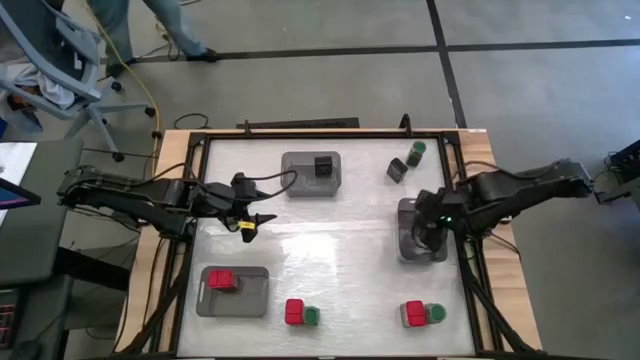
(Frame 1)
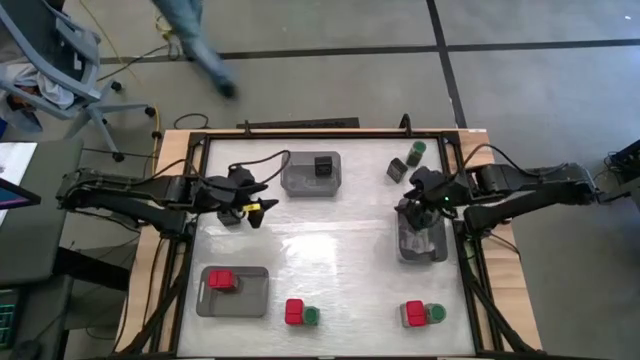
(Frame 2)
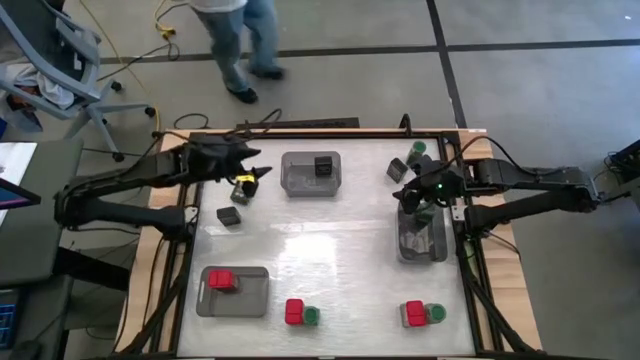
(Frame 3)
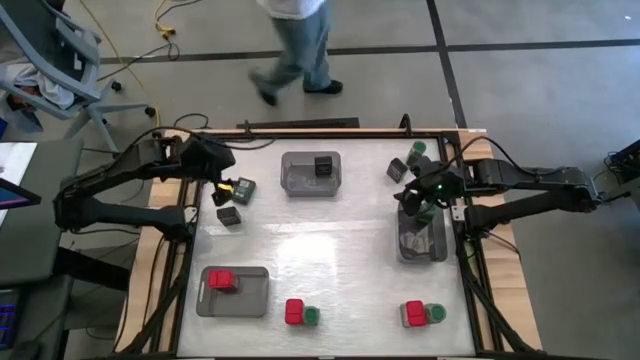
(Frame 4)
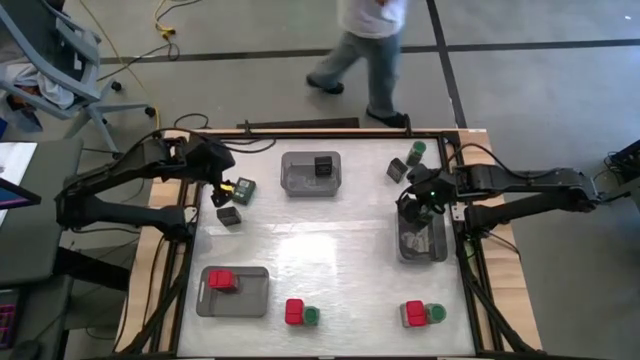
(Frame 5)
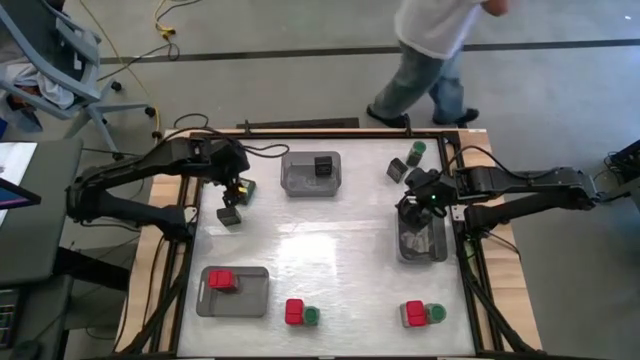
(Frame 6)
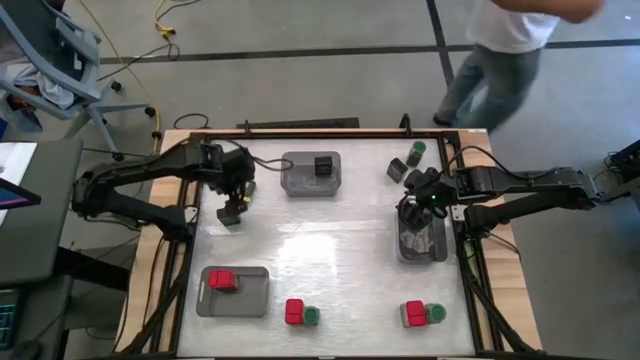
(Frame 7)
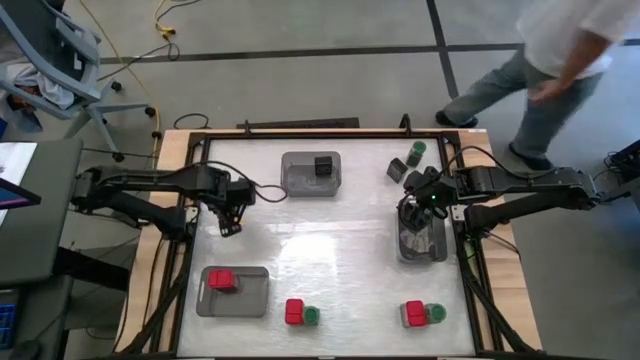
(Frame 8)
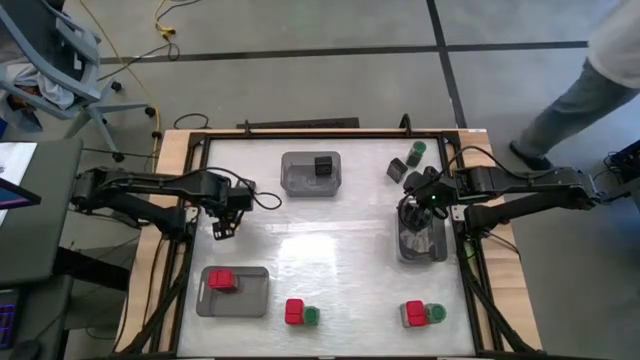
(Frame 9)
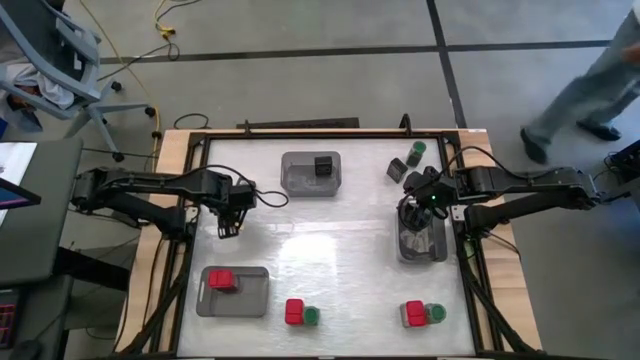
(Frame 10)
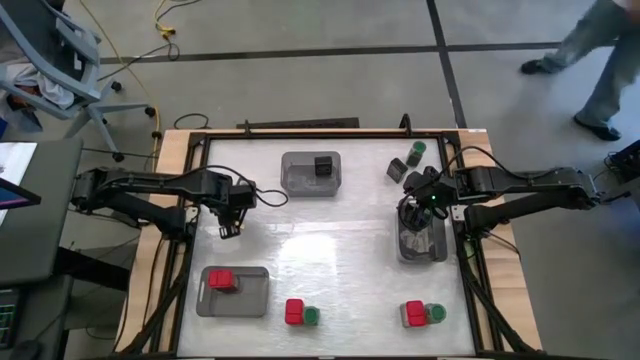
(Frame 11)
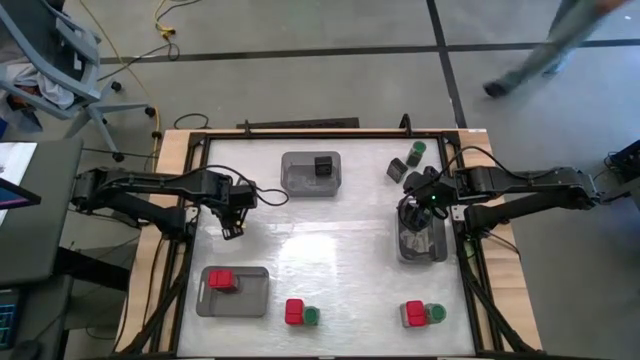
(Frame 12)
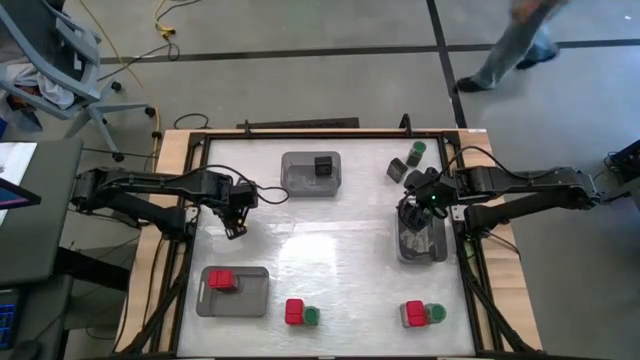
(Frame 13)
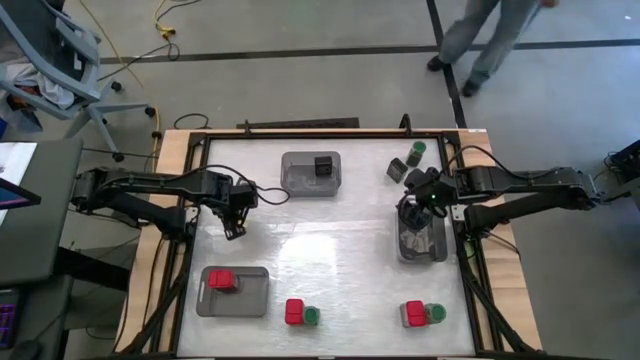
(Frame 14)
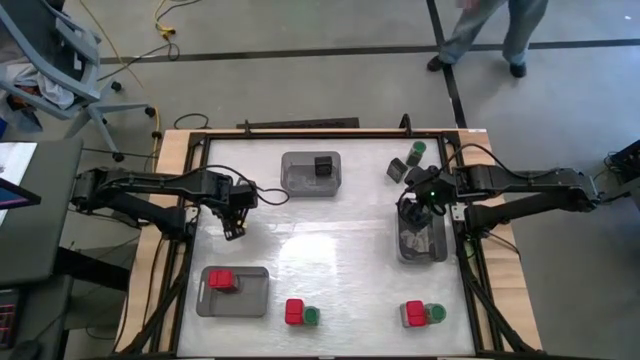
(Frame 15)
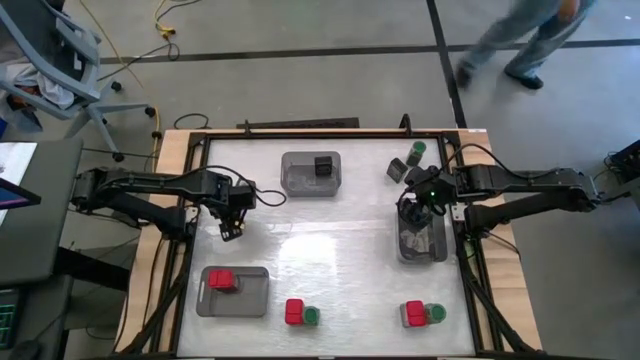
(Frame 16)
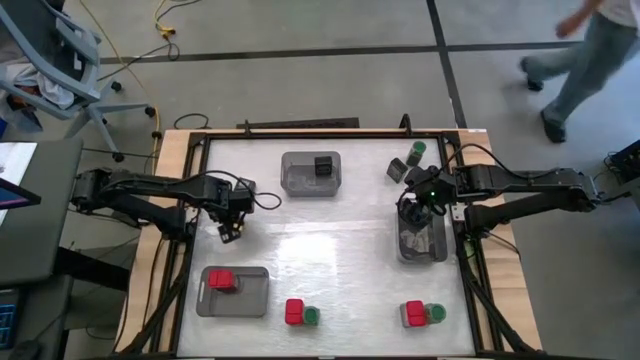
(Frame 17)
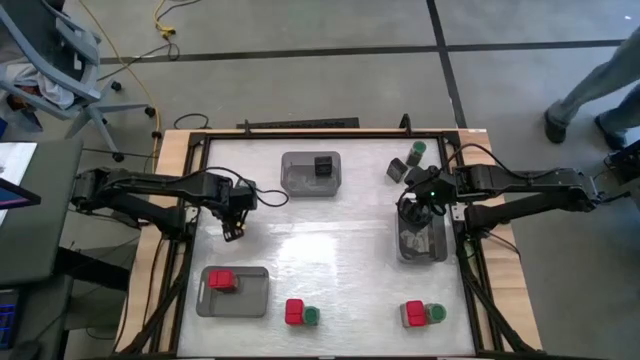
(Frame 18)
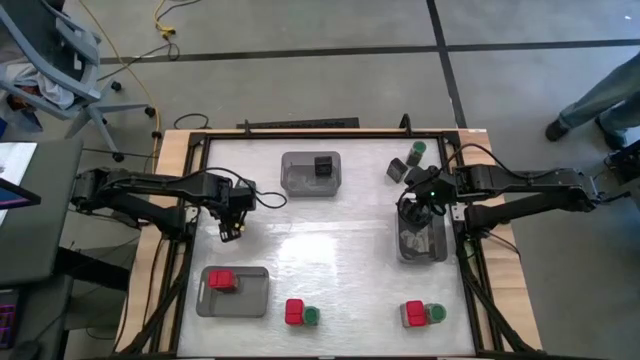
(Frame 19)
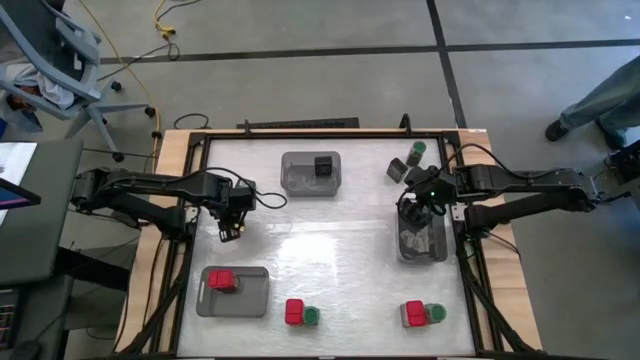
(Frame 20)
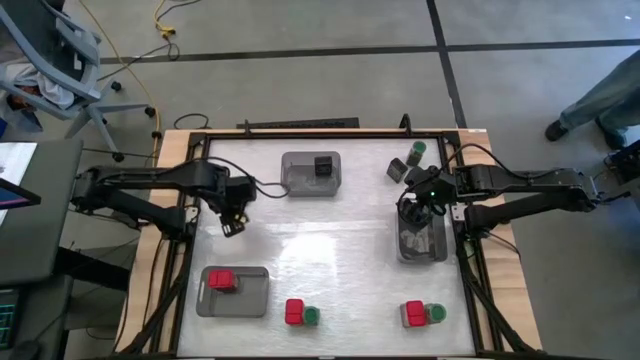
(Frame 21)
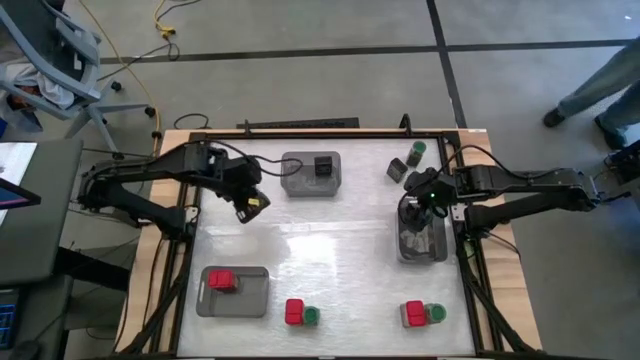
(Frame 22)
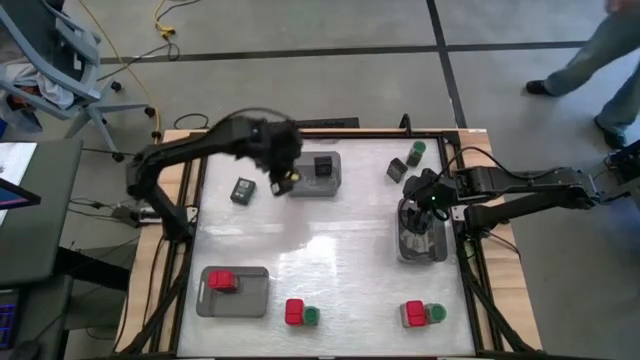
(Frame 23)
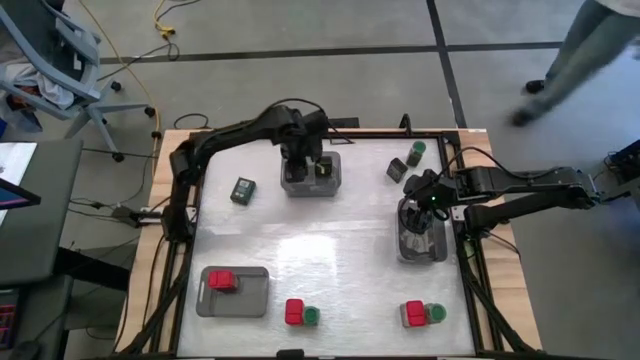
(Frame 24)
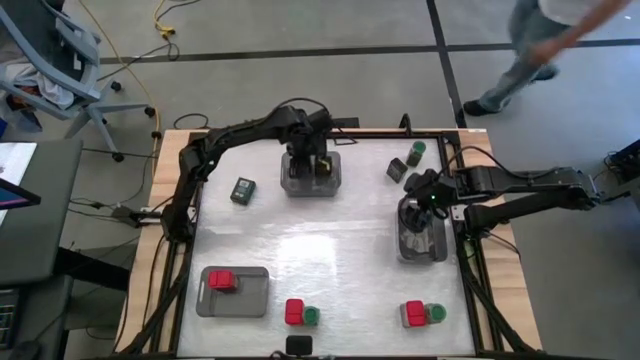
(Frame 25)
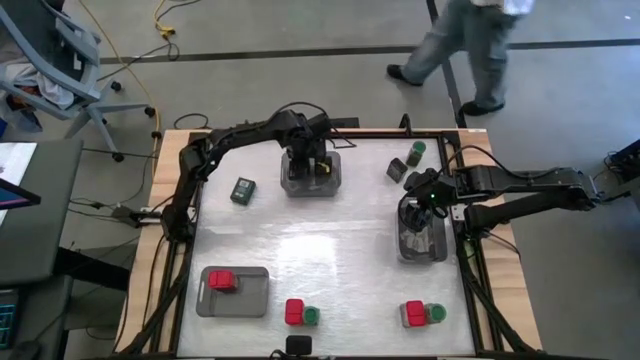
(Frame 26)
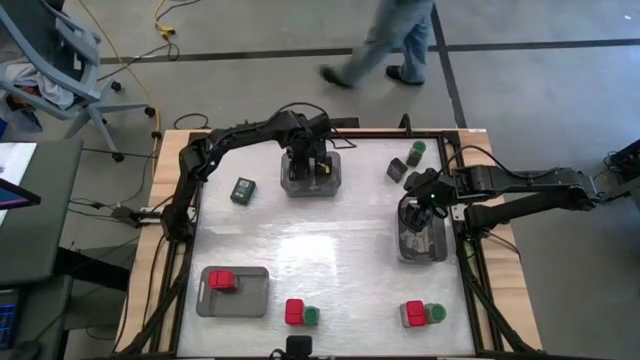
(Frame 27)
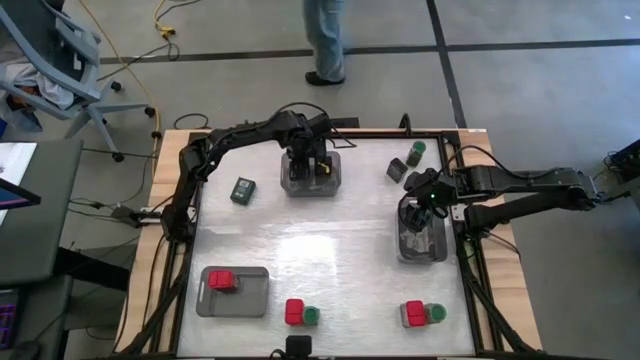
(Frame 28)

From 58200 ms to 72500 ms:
Task: Sort spices by type
Put the bottom left black seasoning can into the top black transparent bin

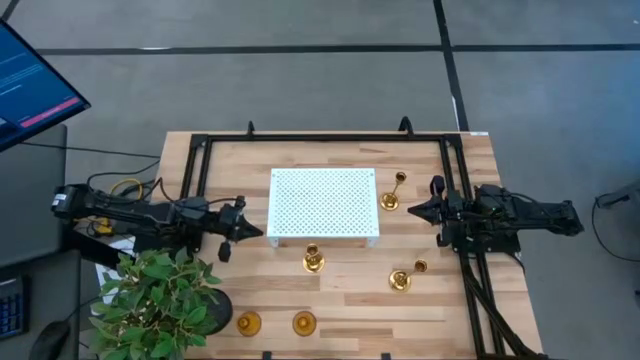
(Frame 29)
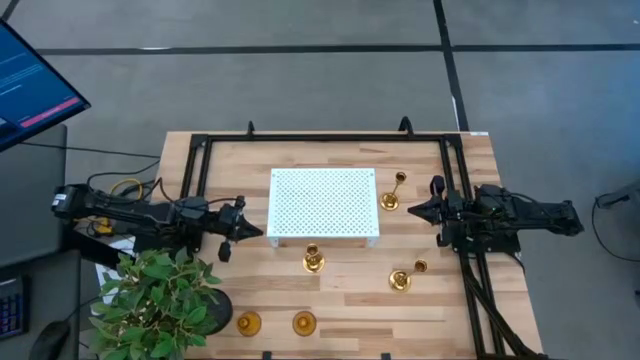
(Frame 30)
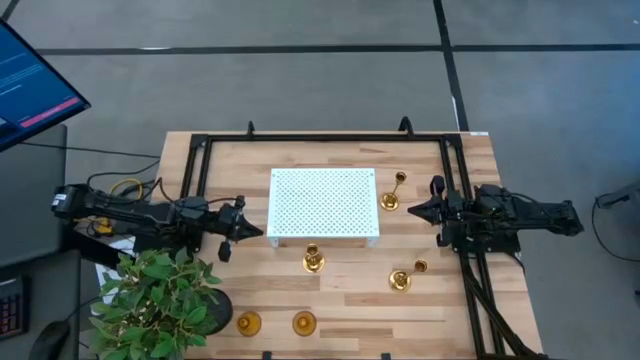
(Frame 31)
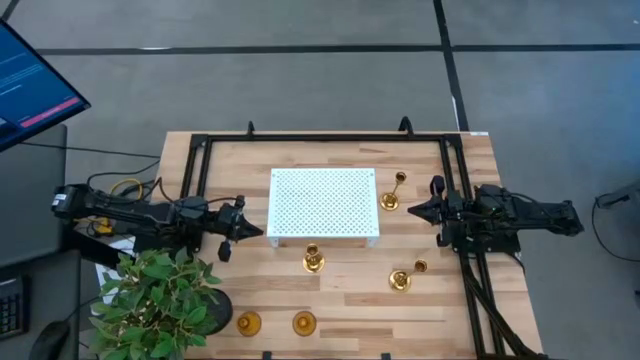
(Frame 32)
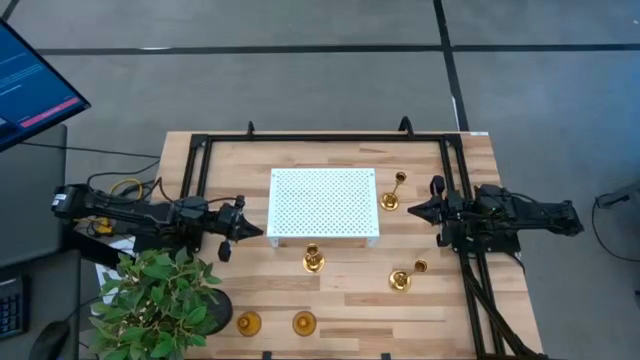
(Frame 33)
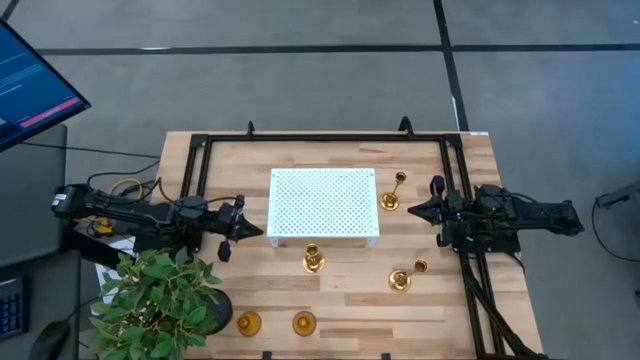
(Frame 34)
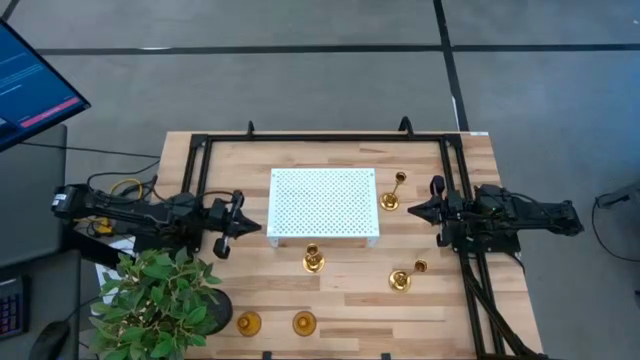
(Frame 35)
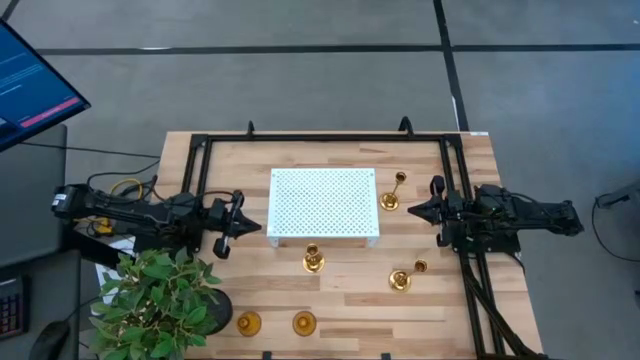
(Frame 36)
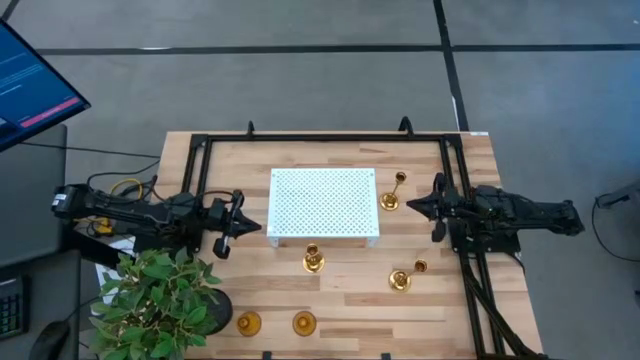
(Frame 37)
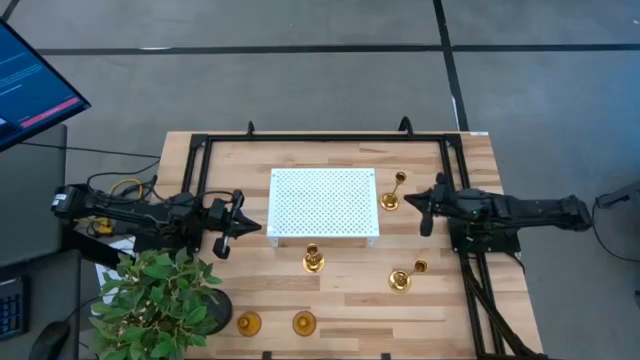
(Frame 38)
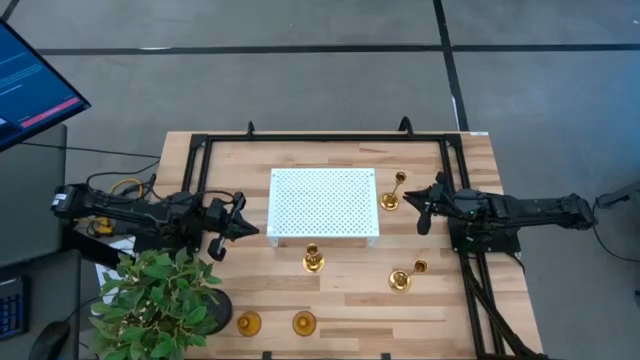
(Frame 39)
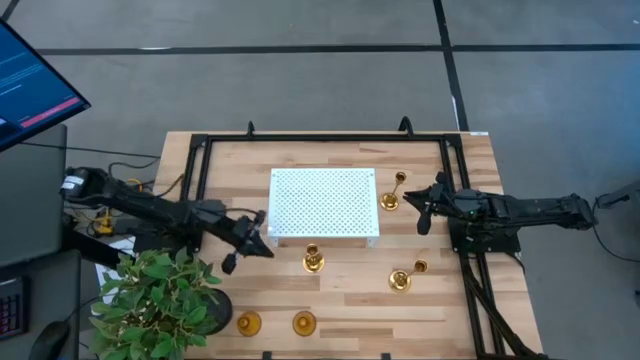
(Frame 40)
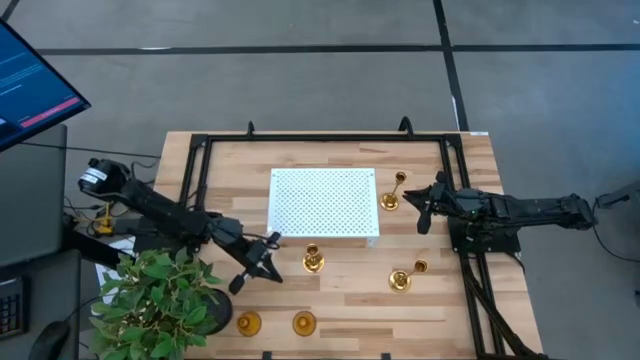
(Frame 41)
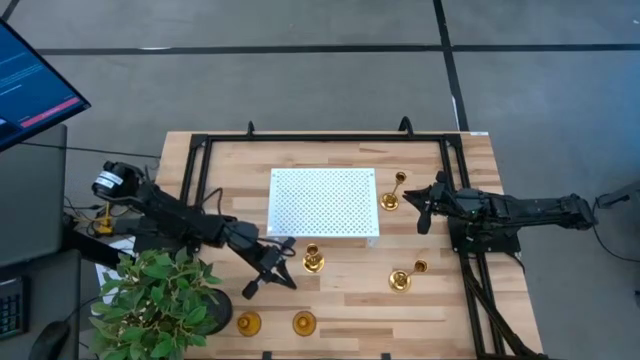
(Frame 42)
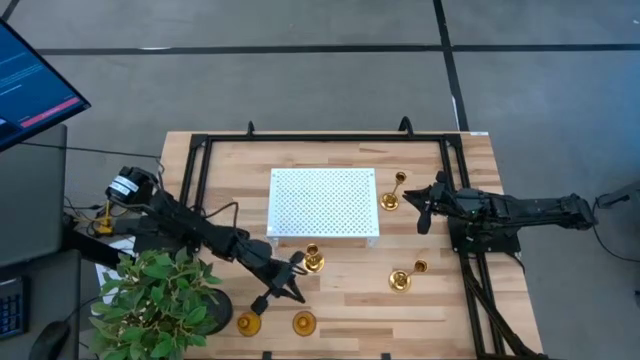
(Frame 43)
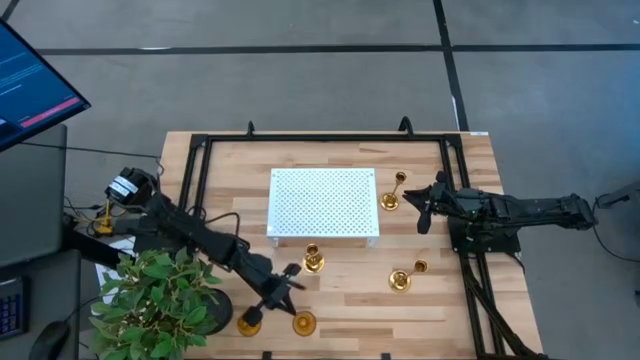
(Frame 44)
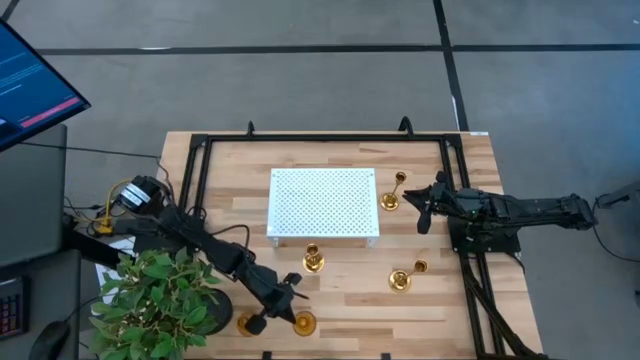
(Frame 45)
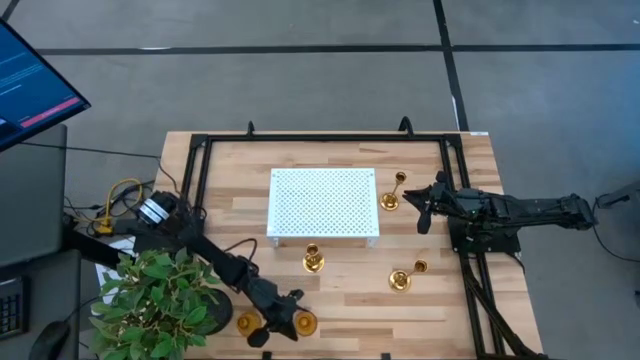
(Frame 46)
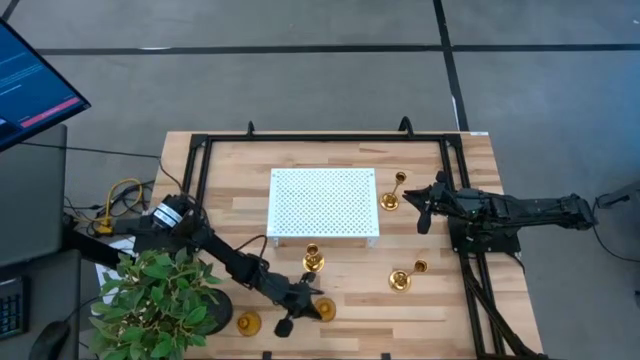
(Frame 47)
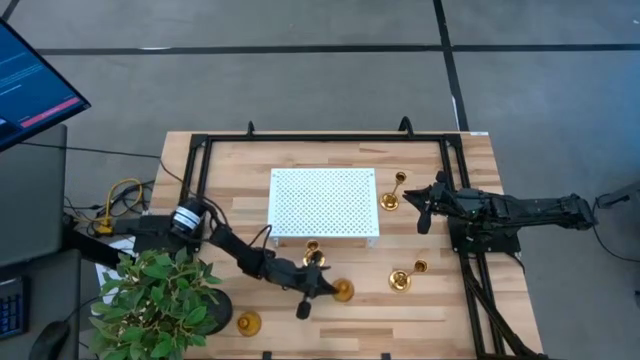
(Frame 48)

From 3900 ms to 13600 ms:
Task: Pick & Place candle stick holders
Move the right brown vase candle holder to the center
